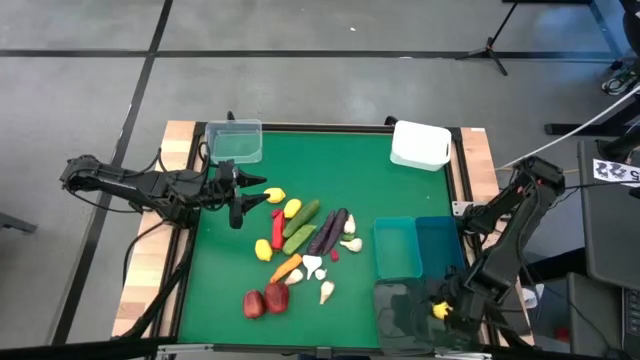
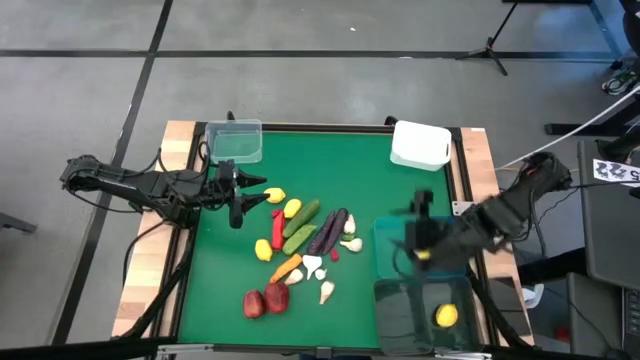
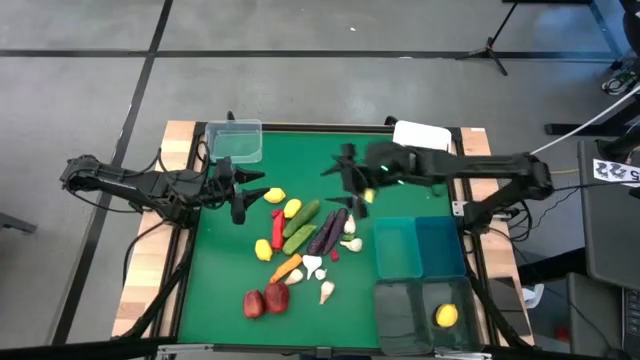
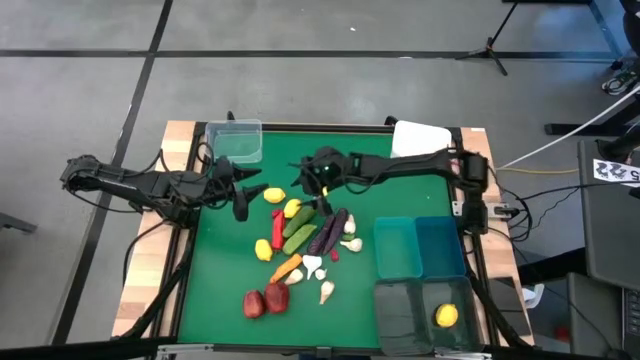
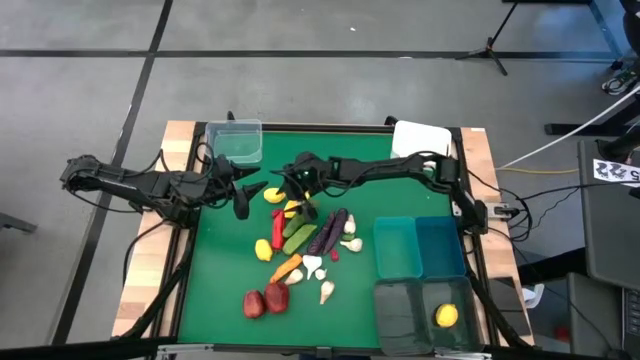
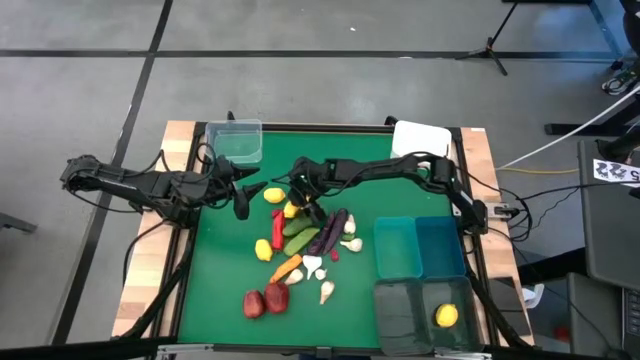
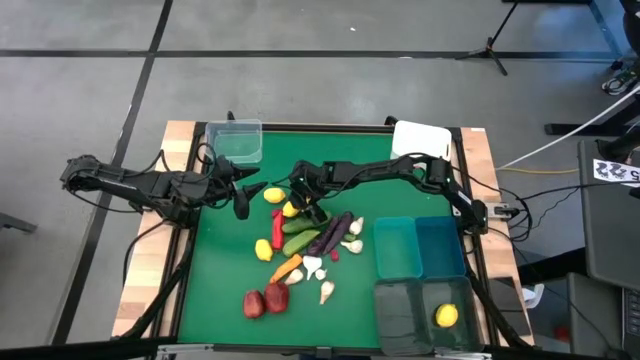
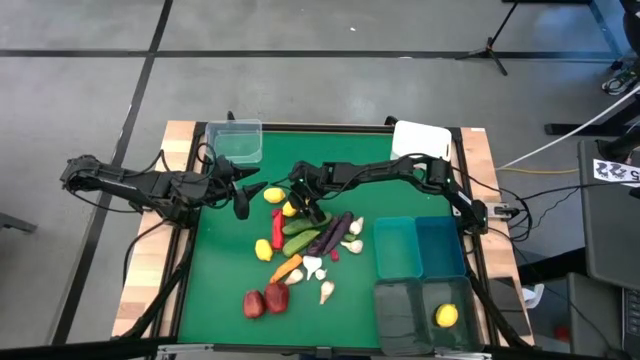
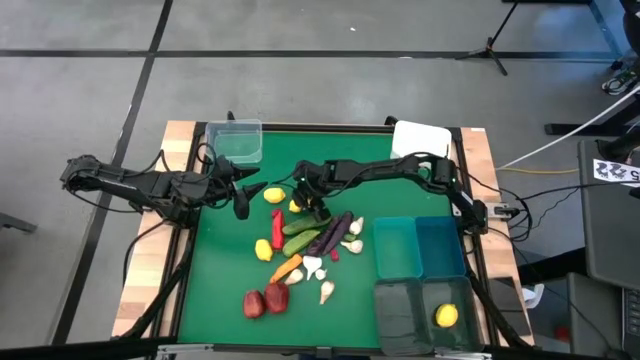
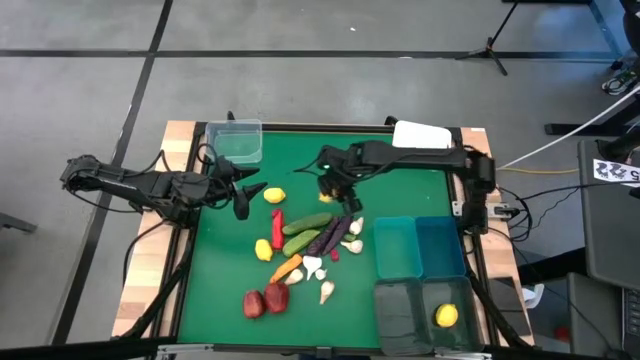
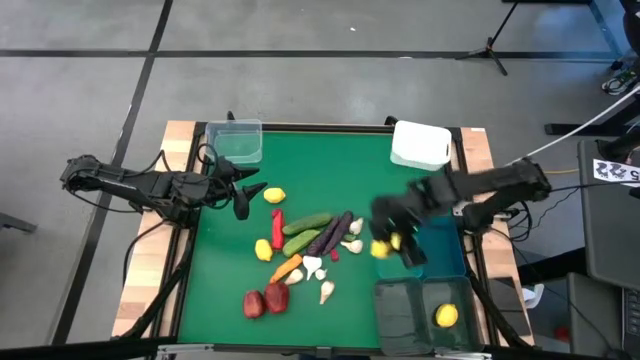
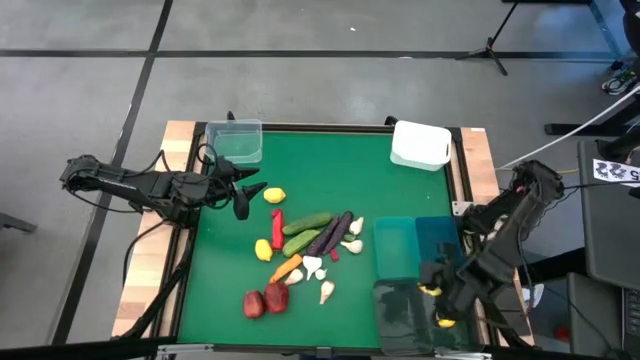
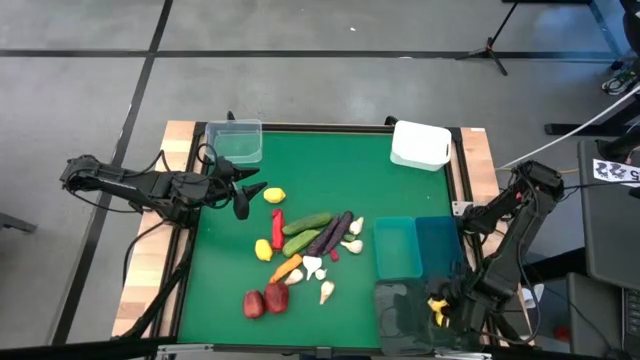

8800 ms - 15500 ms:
Task: Sort produce into baskets
Put the lemon into the right black bin

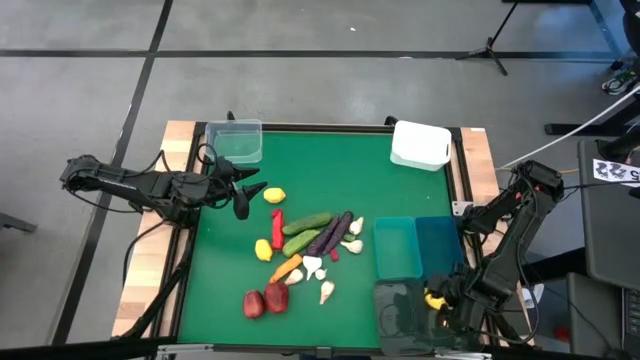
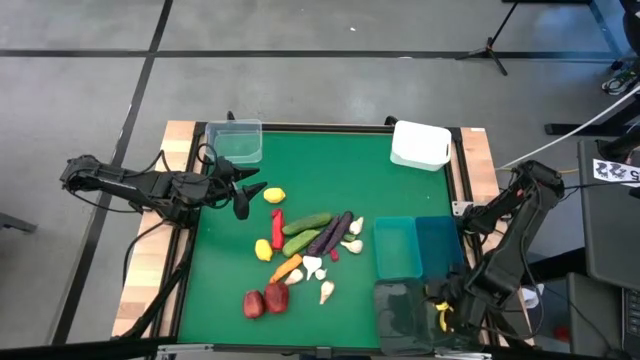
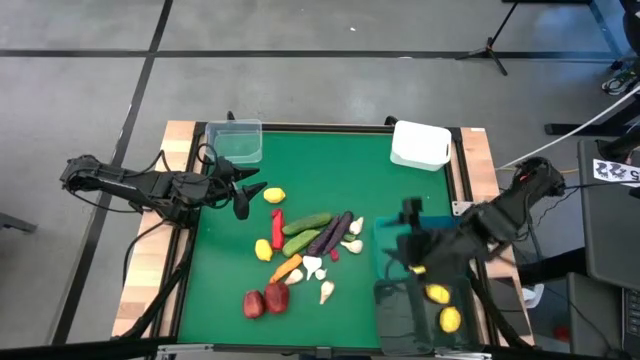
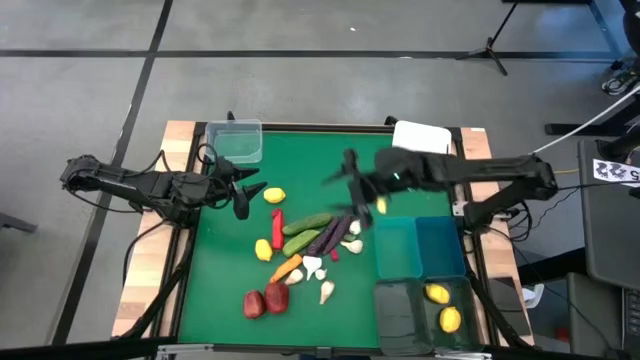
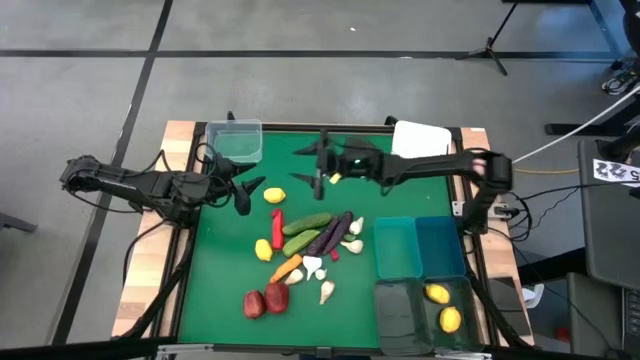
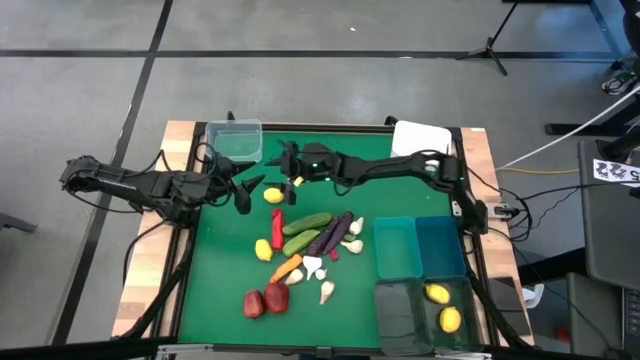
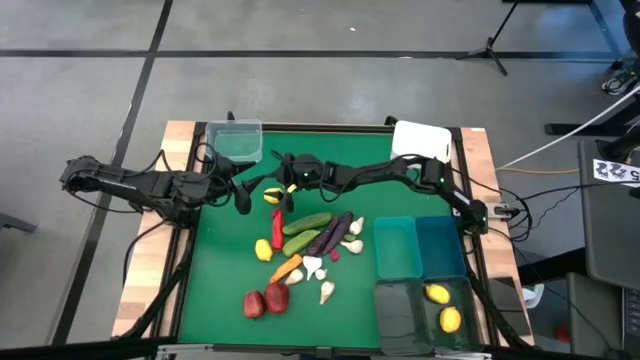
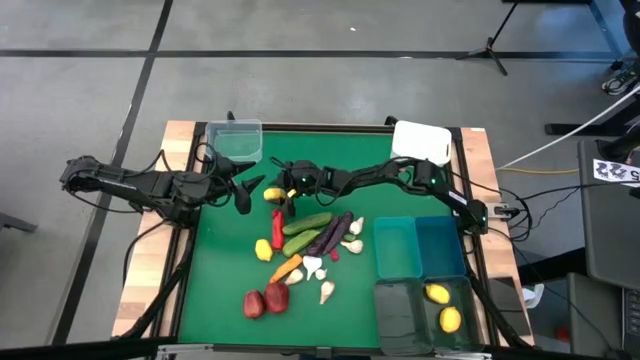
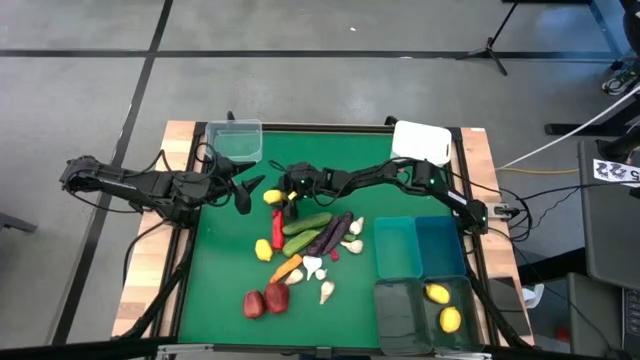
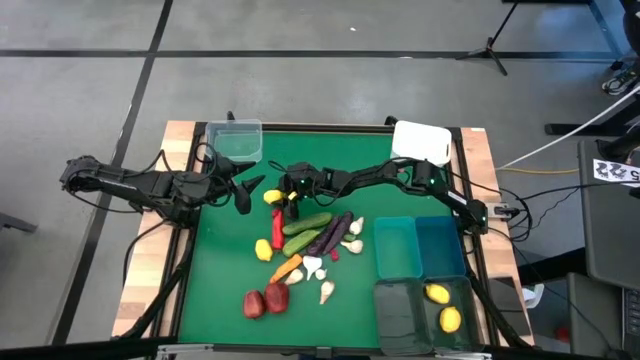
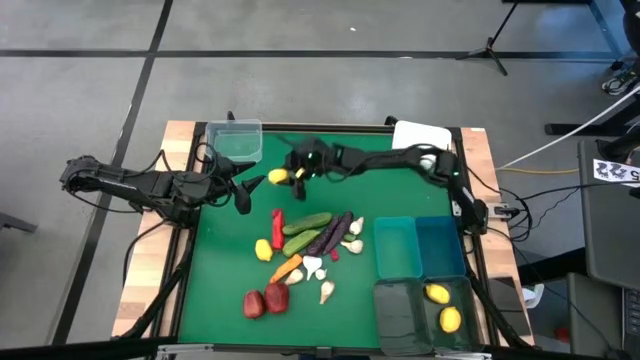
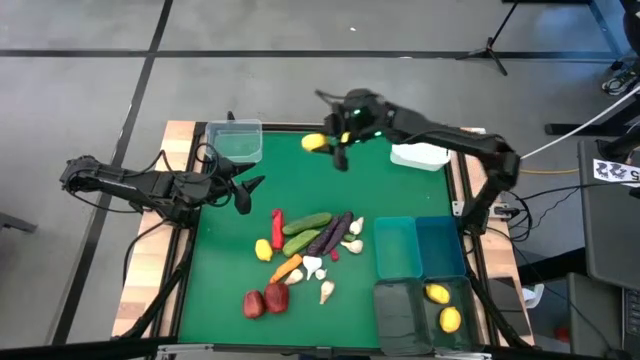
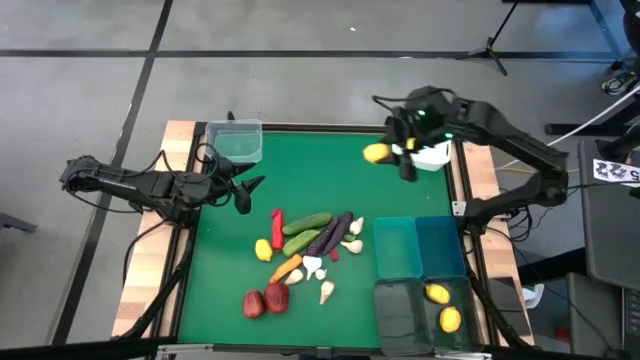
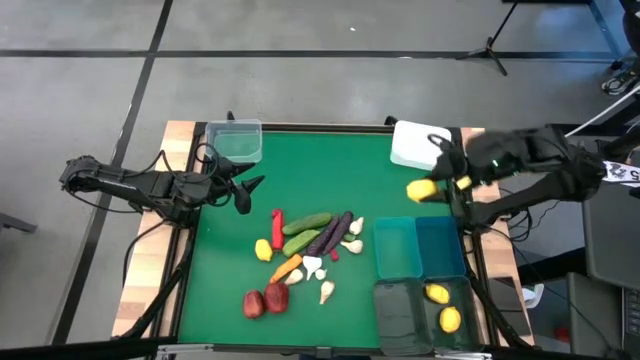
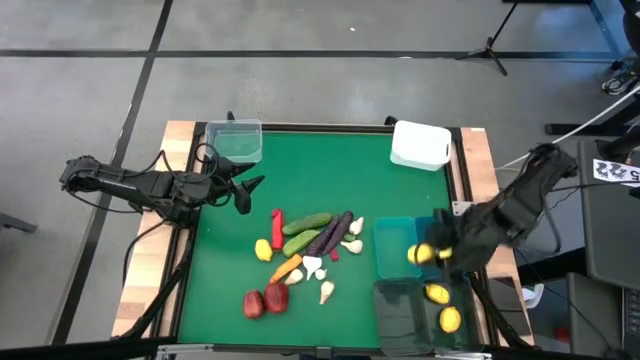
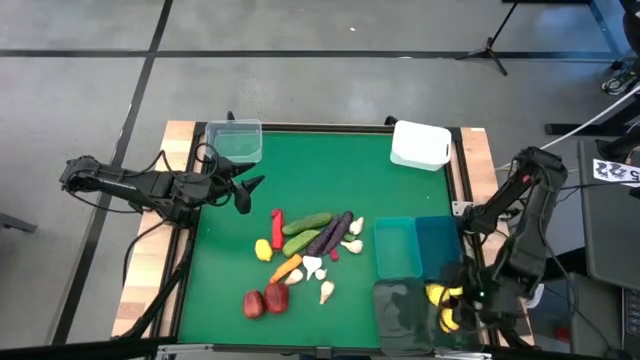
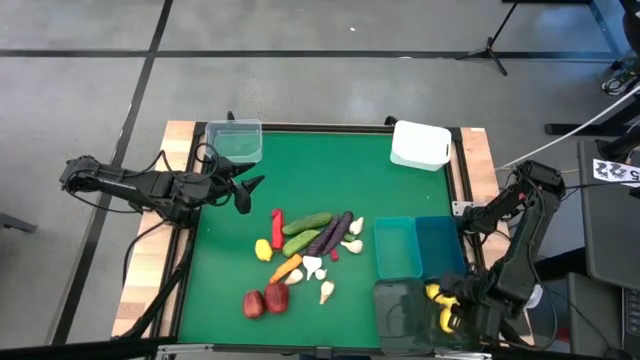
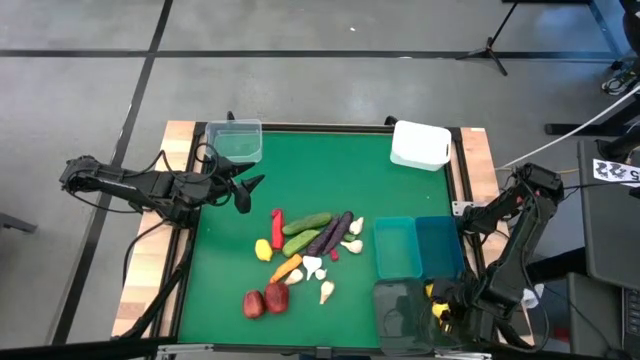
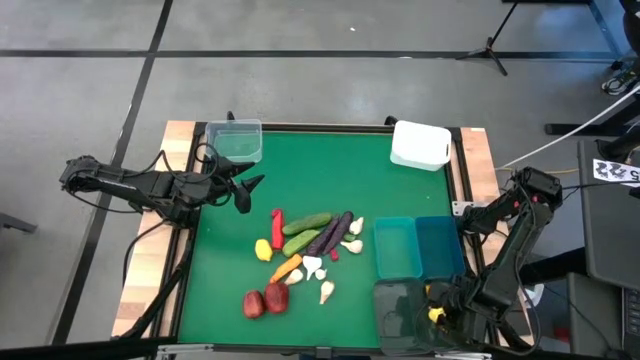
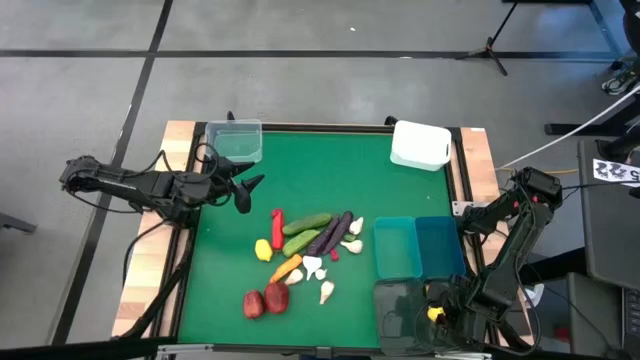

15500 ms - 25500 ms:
Put the lemon into the right black bin

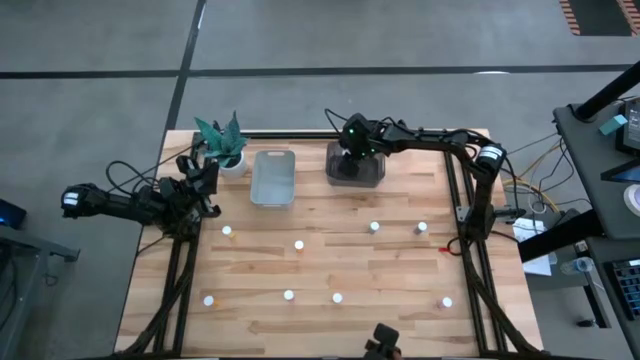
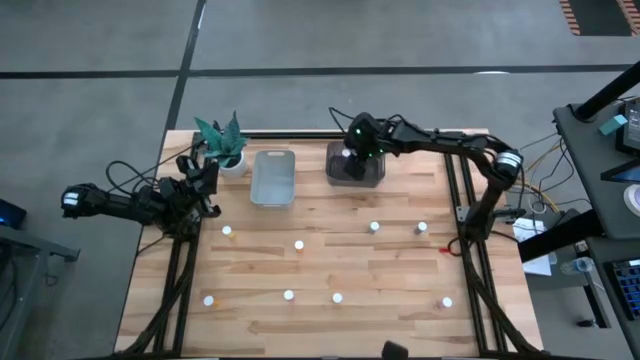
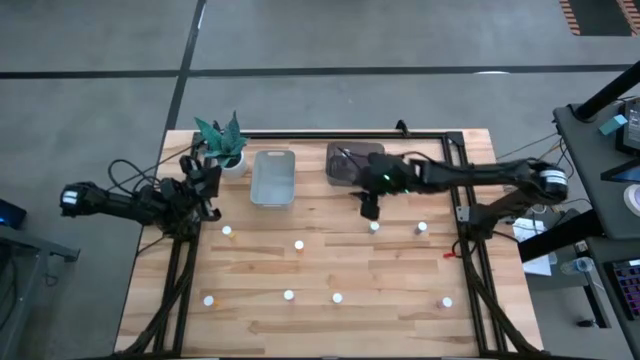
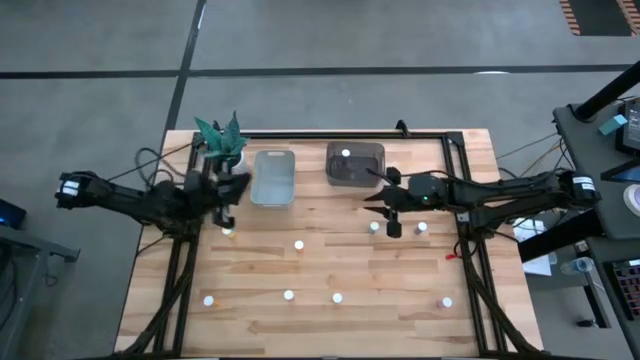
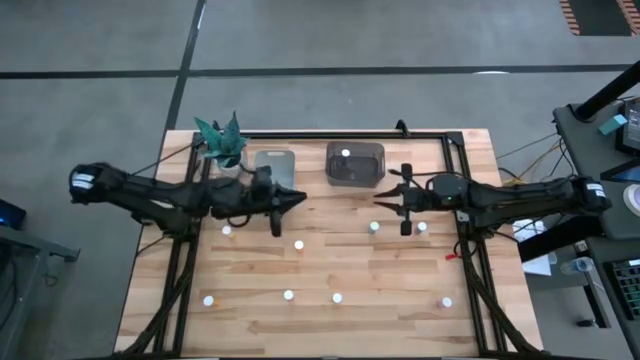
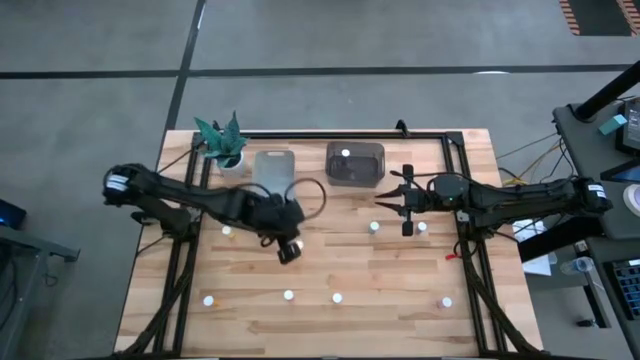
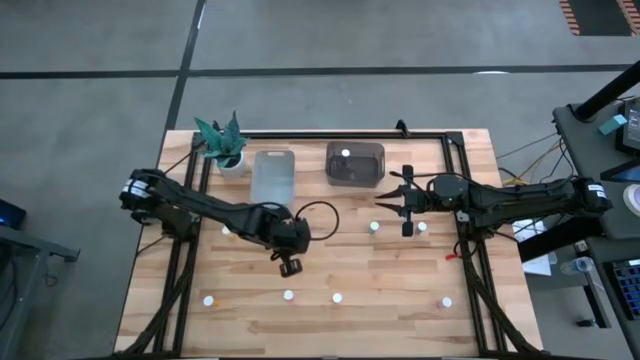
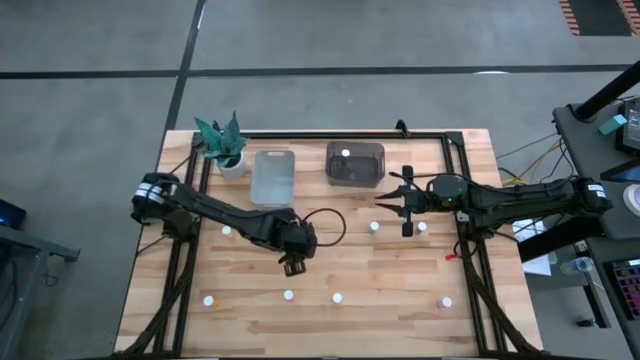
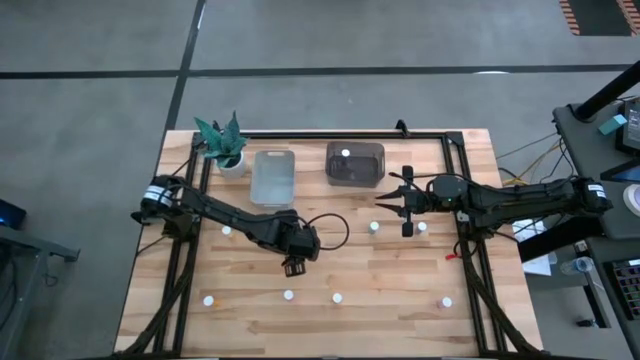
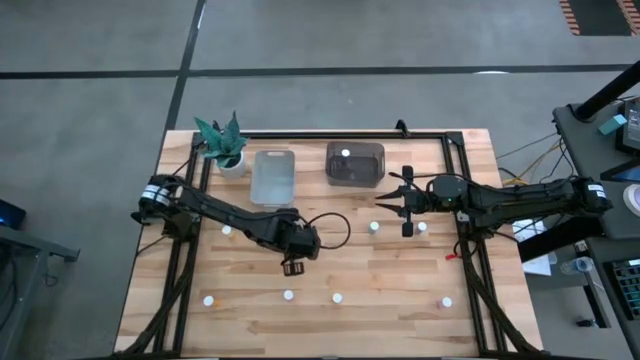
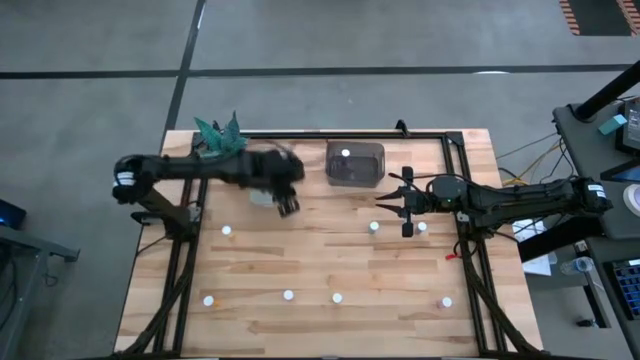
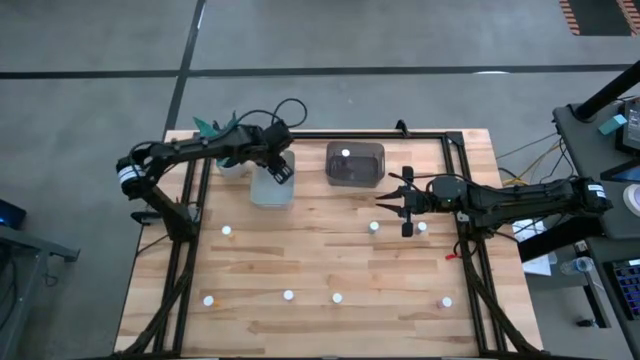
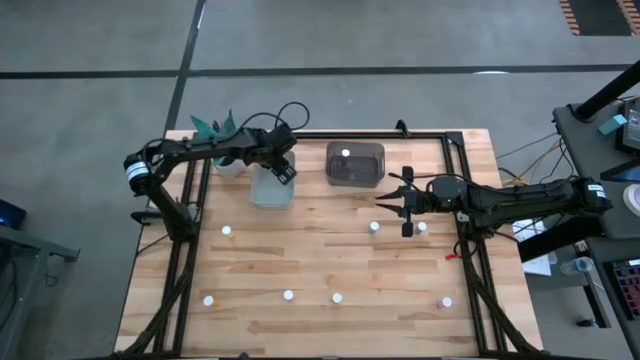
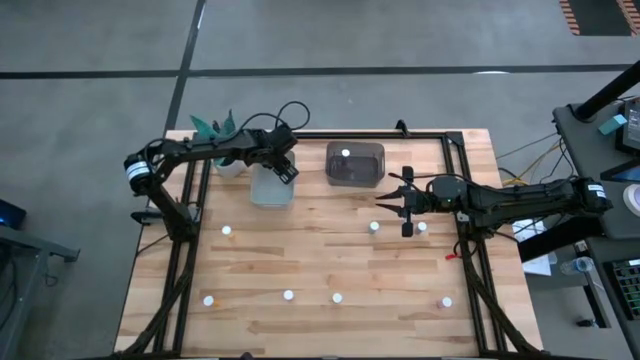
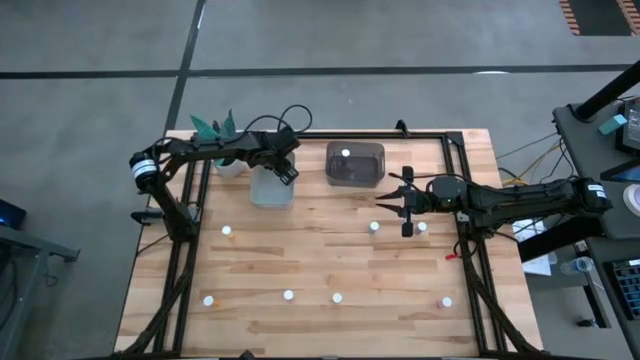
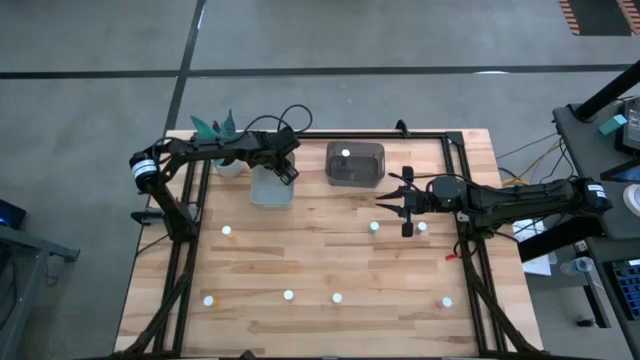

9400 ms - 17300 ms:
Task: Pick and place medicine bottles into bin by pill shape (circle, oval)
Put the top orange tablet bottle into the gray bin
